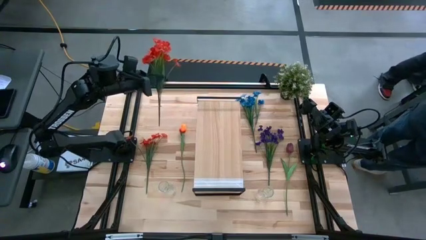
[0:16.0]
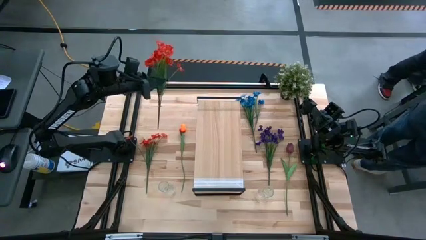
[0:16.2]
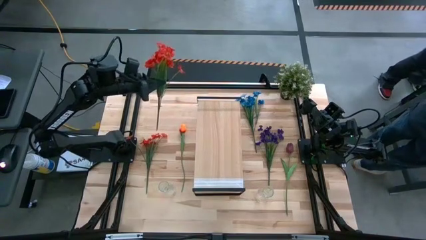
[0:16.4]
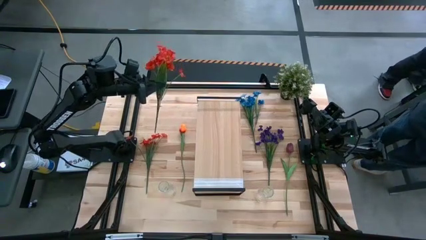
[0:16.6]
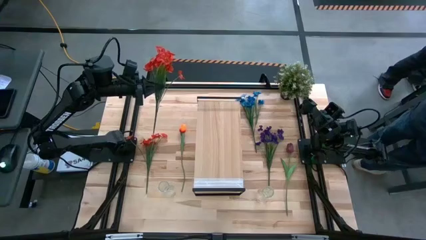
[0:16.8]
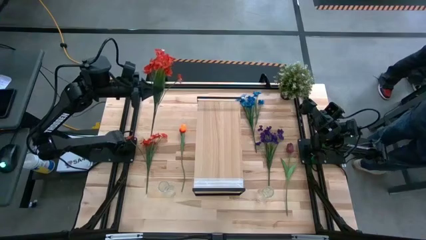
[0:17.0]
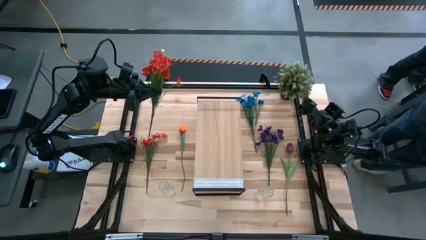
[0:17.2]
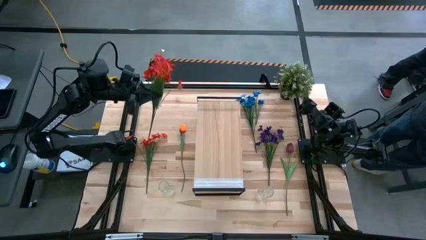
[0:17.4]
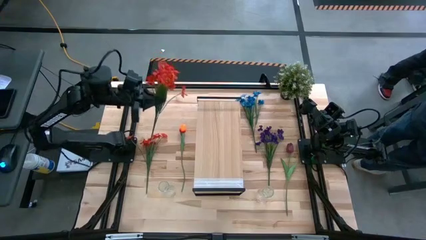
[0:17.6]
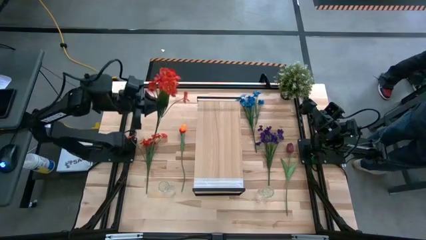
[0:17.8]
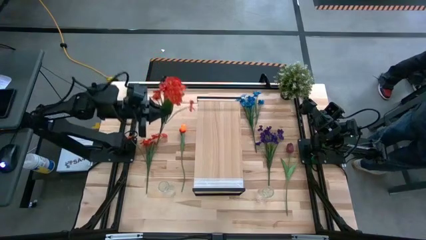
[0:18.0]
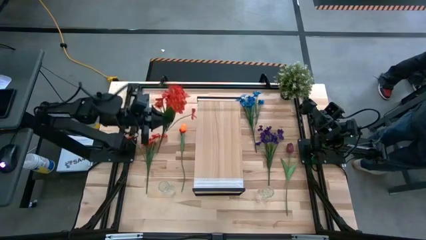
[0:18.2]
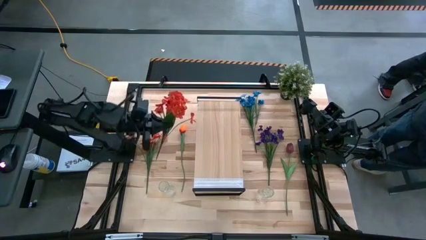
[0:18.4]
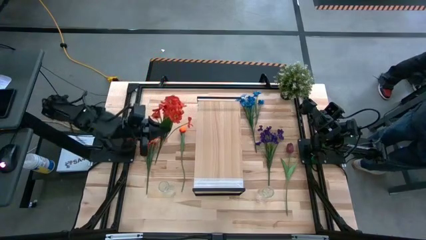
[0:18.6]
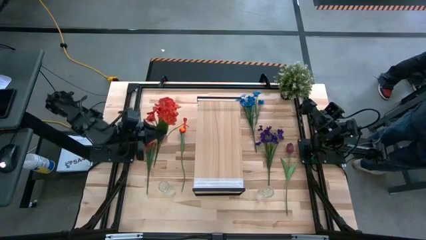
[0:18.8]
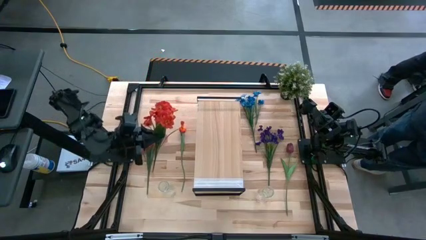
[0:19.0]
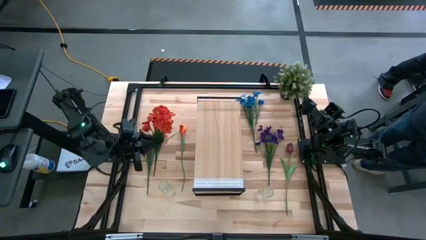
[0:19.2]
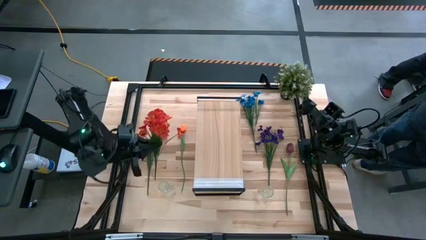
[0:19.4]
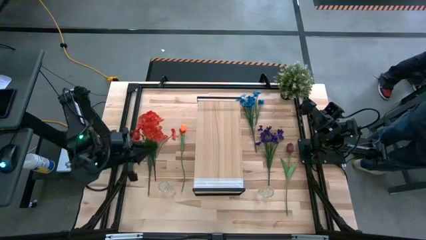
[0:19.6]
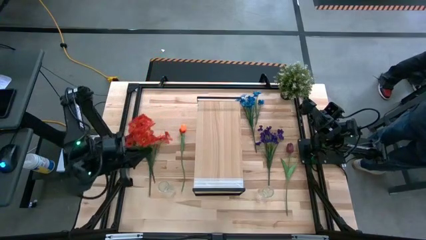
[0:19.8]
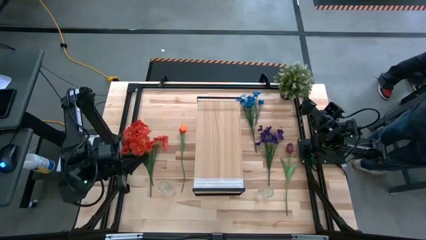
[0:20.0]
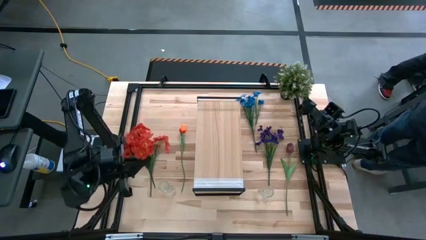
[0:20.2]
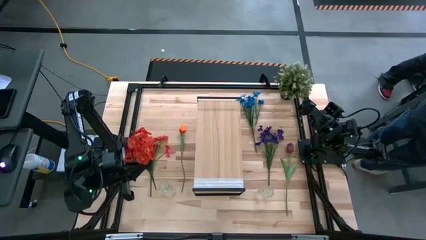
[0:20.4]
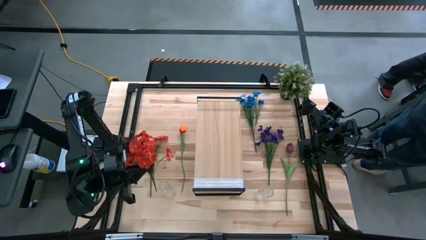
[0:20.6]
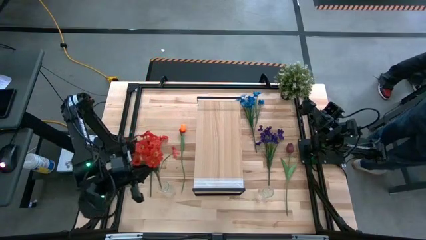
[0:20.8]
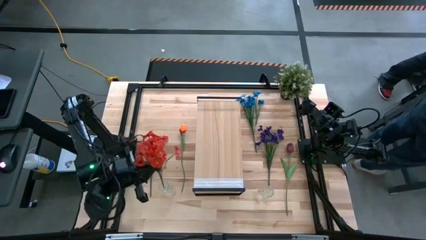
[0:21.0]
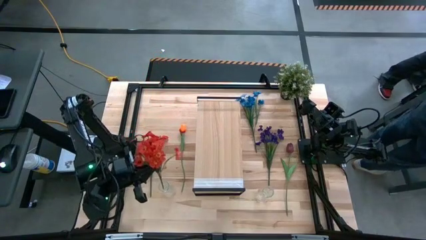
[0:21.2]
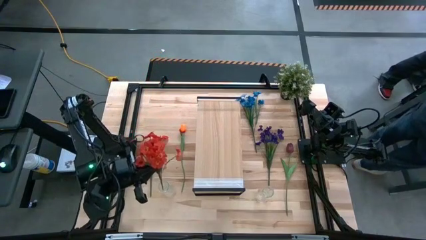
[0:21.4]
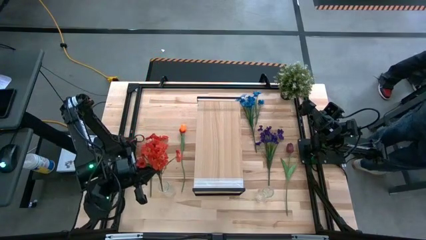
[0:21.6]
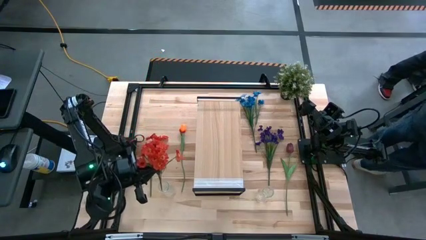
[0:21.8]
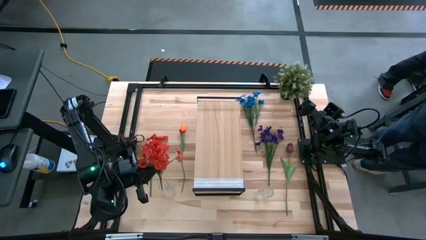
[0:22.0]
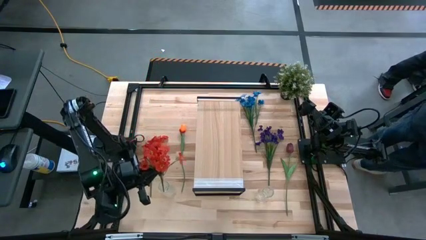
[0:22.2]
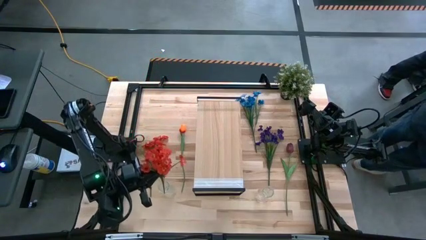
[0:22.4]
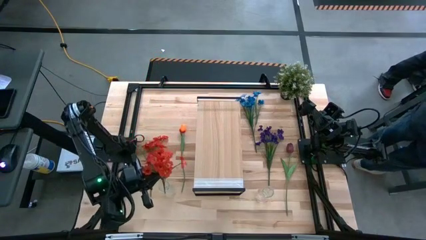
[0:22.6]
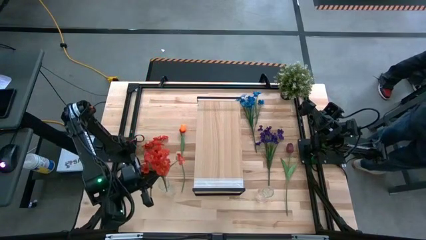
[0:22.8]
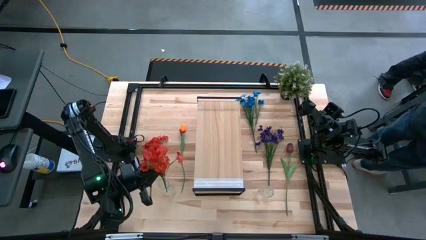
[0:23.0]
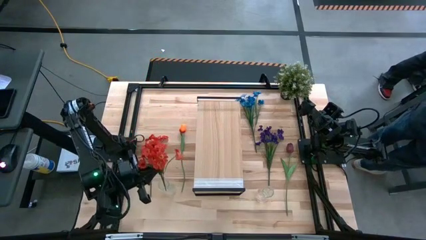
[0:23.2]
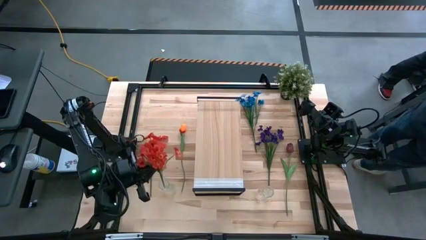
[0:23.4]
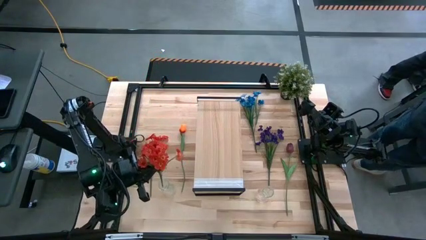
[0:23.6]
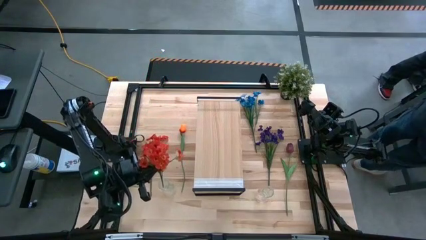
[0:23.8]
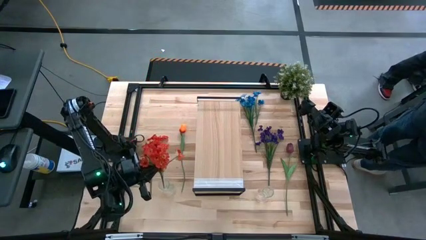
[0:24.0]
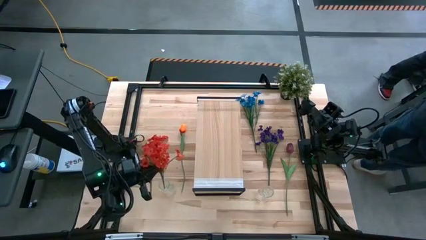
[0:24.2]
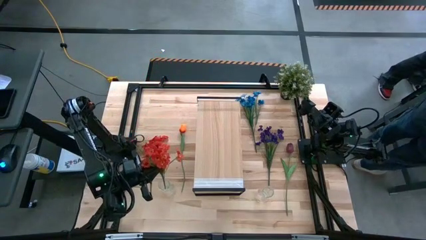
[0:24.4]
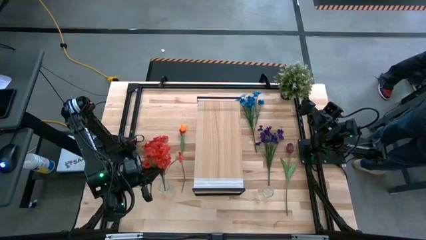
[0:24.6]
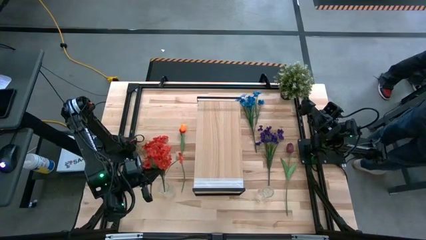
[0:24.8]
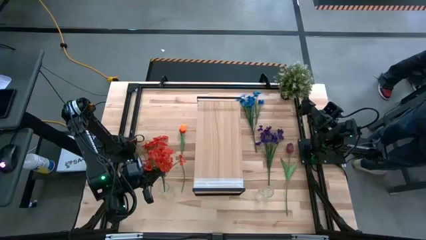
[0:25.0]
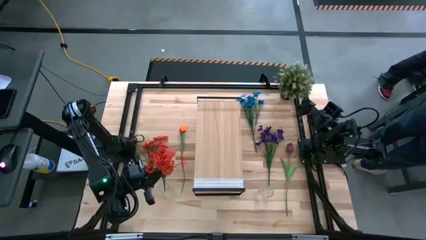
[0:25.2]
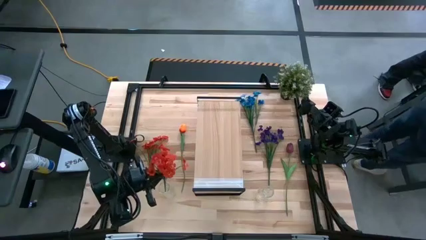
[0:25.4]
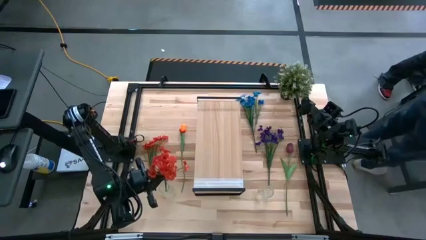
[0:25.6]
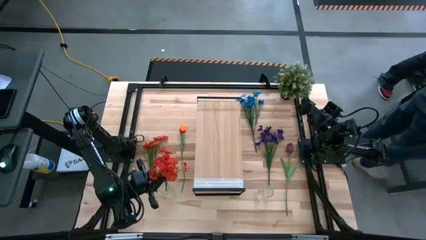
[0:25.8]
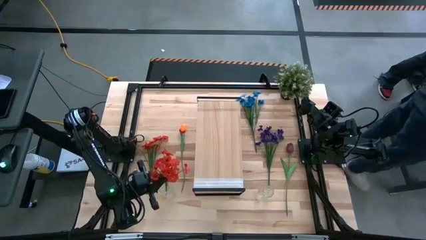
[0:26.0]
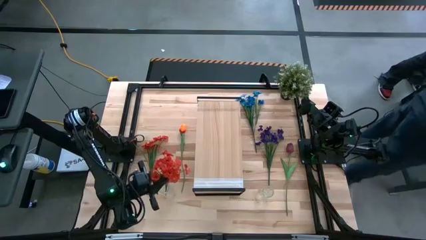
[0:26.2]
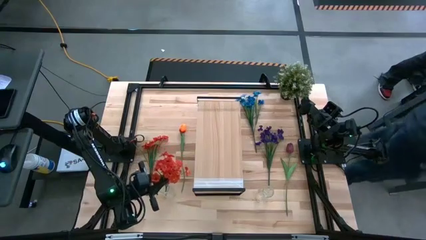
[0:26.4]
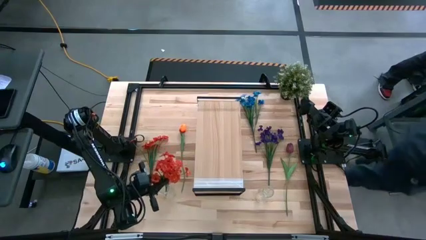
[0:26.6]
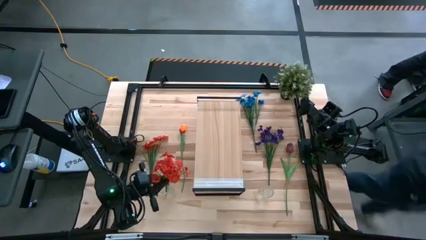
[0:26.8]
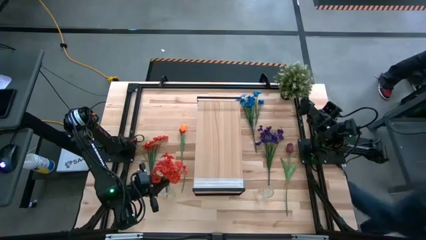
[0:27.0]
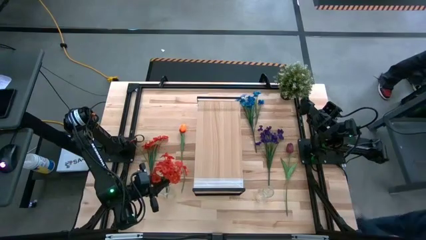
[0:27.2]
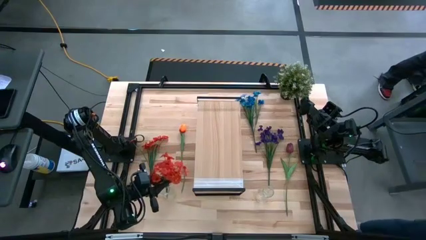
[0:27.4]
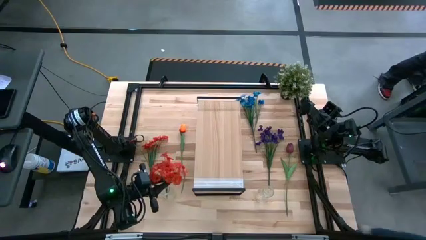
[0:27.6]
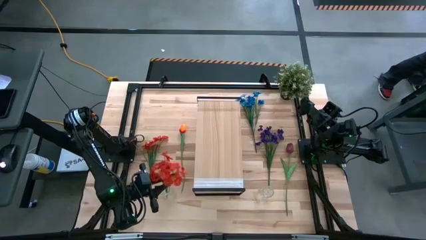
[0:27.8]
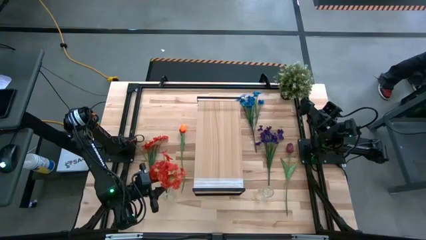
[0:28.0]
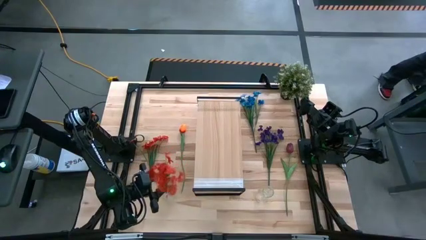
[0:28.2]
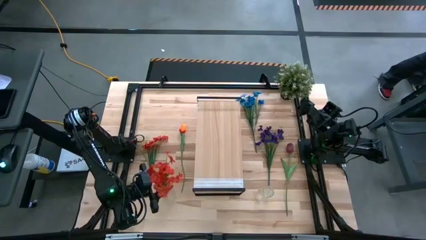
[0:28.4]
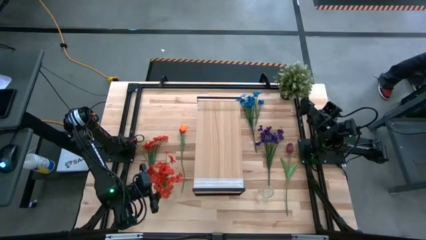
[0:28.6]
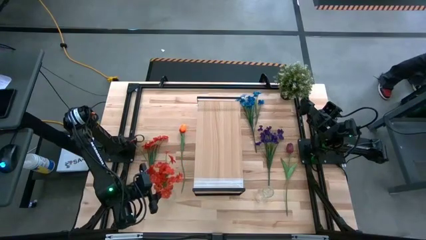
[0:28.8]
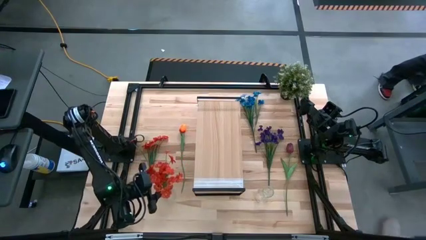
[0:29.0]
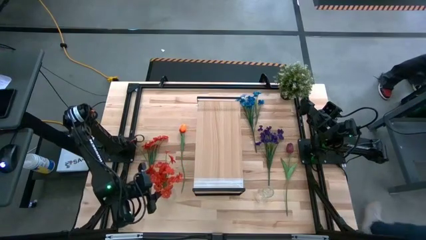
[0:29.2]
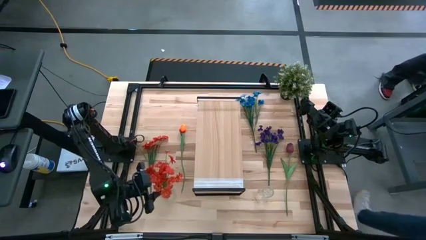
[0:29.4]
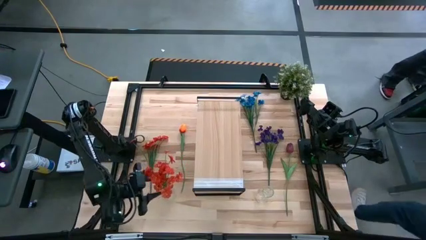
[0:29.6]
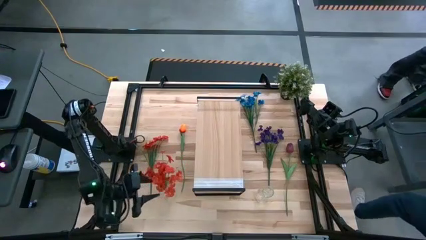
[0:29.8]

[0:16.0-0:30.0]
Task: Pick and place flowers into a vace then onto a shelf
Put the top orange flowers into the left transparent vase
